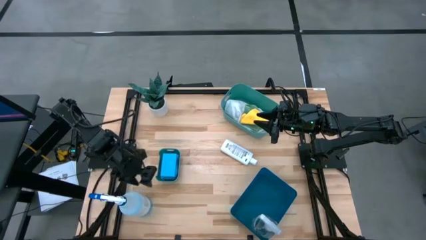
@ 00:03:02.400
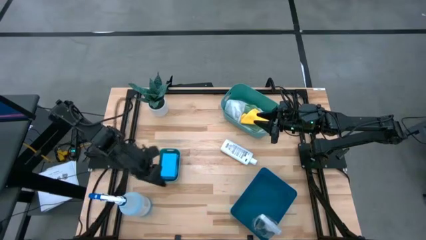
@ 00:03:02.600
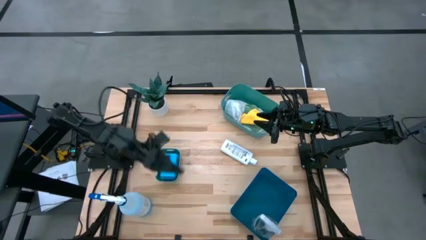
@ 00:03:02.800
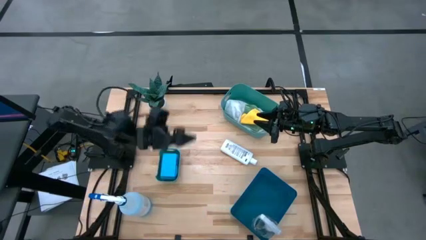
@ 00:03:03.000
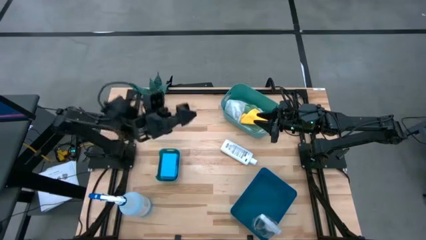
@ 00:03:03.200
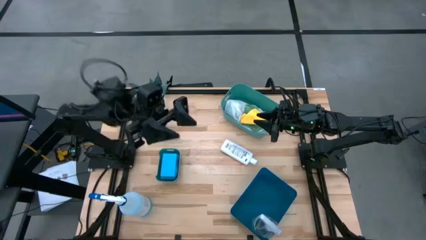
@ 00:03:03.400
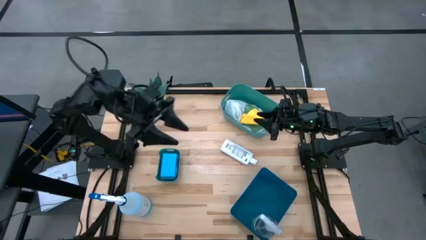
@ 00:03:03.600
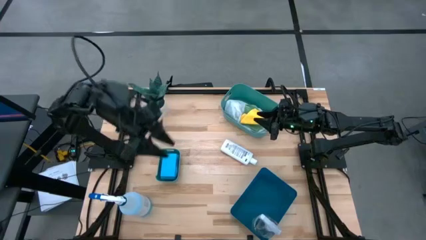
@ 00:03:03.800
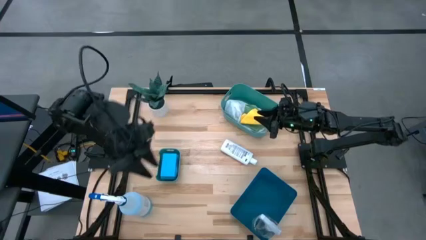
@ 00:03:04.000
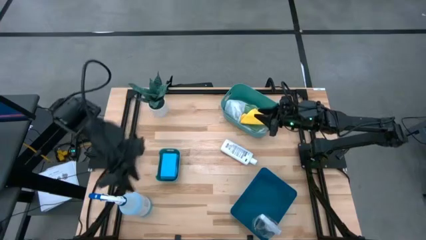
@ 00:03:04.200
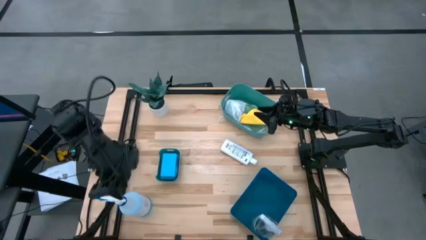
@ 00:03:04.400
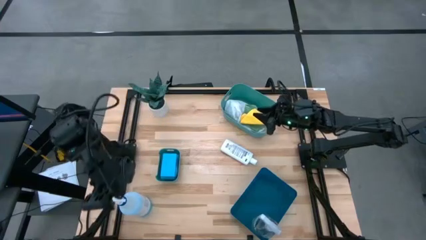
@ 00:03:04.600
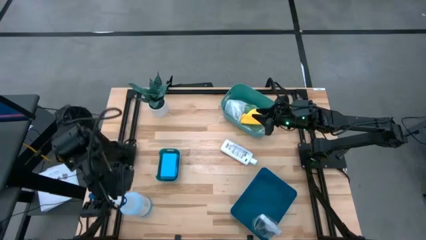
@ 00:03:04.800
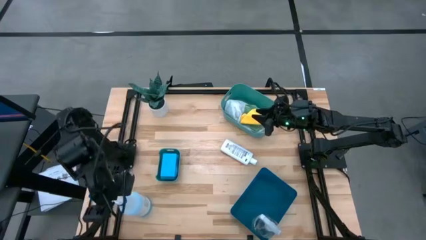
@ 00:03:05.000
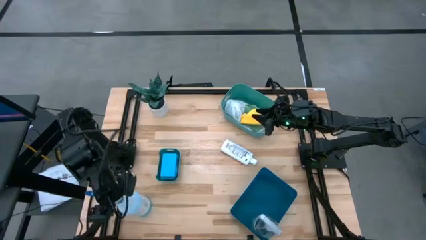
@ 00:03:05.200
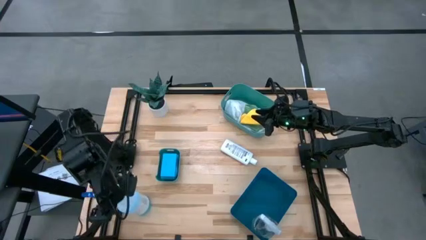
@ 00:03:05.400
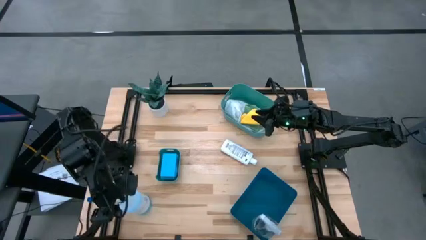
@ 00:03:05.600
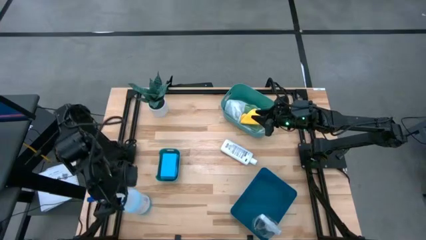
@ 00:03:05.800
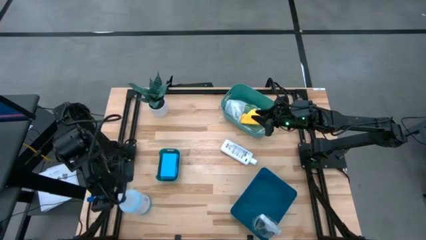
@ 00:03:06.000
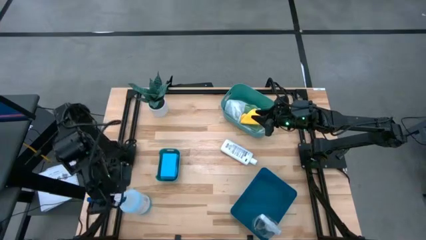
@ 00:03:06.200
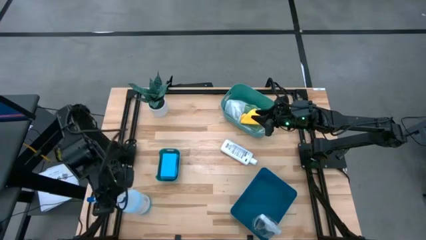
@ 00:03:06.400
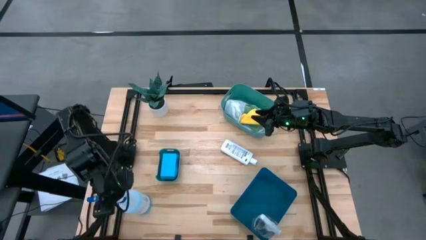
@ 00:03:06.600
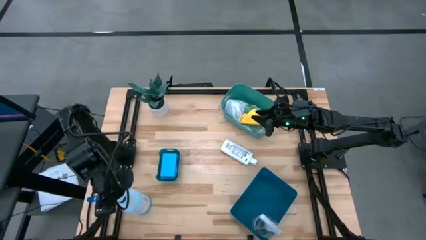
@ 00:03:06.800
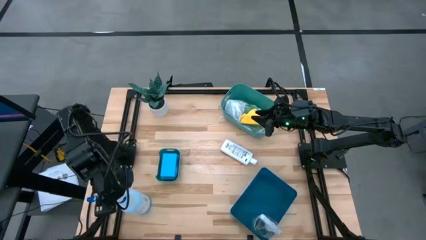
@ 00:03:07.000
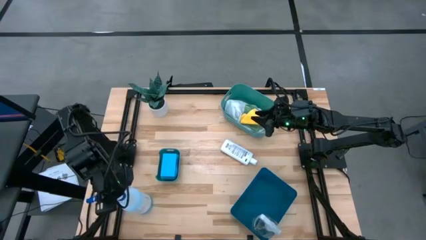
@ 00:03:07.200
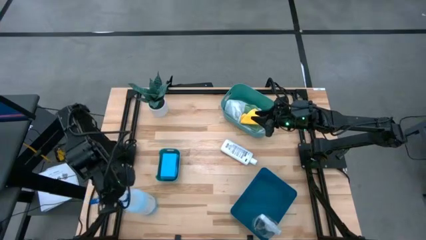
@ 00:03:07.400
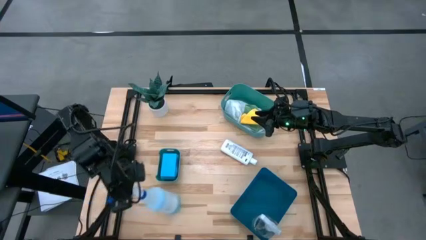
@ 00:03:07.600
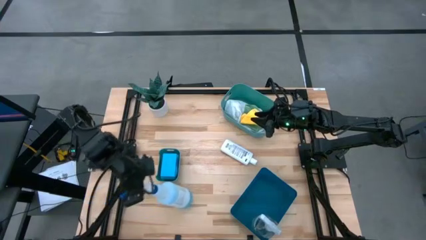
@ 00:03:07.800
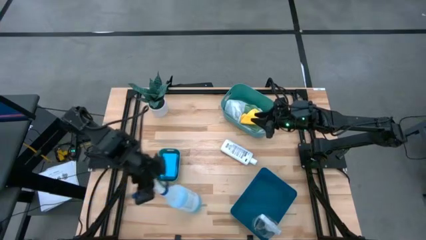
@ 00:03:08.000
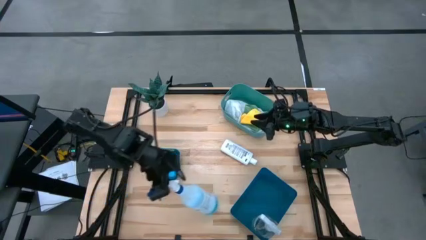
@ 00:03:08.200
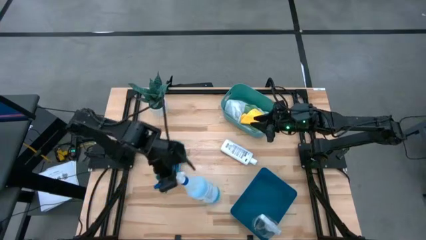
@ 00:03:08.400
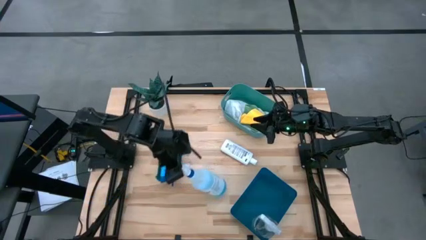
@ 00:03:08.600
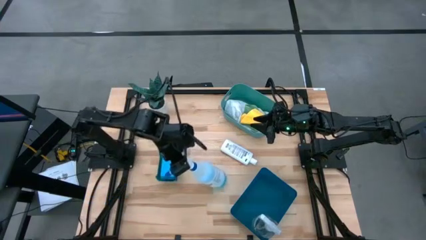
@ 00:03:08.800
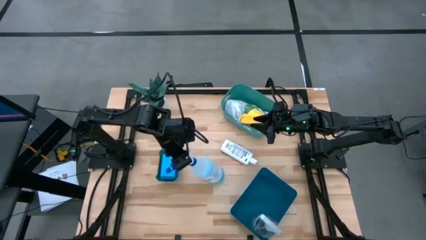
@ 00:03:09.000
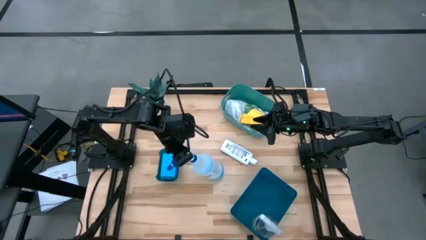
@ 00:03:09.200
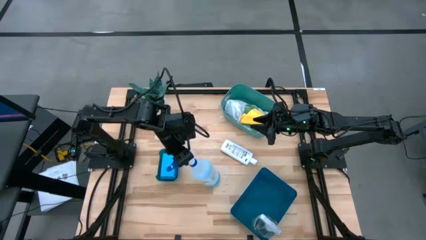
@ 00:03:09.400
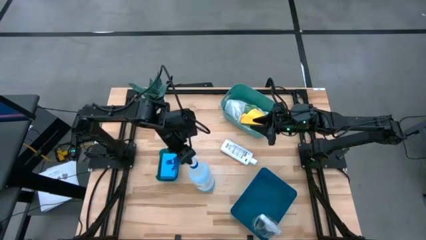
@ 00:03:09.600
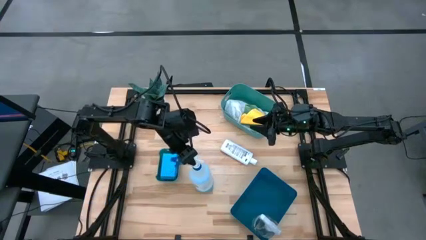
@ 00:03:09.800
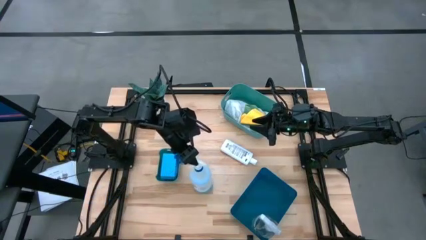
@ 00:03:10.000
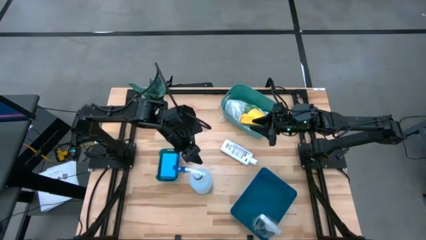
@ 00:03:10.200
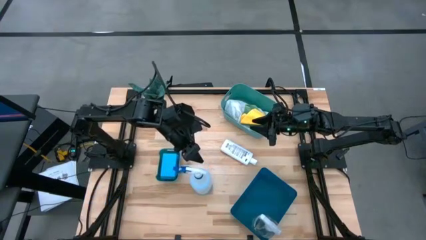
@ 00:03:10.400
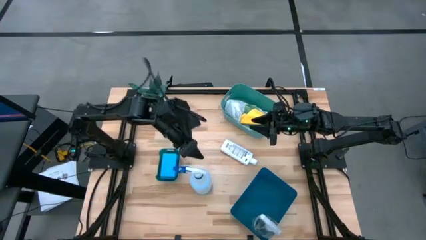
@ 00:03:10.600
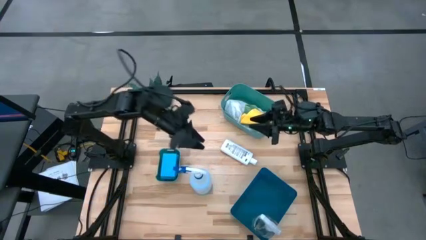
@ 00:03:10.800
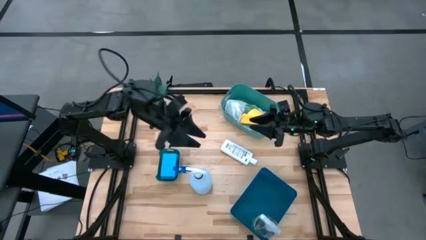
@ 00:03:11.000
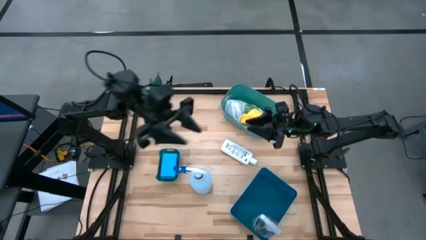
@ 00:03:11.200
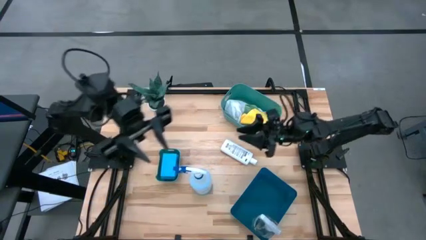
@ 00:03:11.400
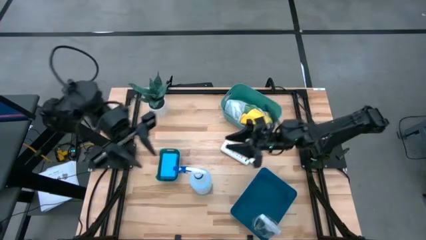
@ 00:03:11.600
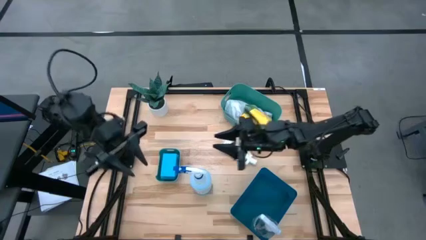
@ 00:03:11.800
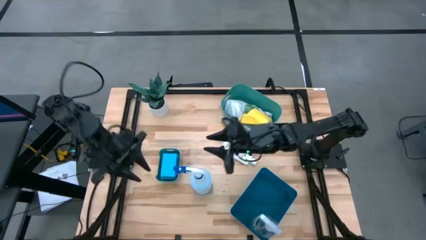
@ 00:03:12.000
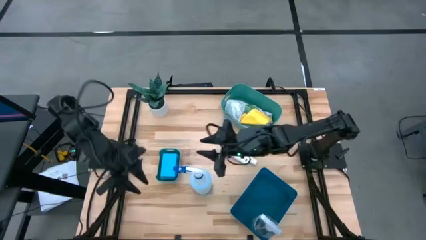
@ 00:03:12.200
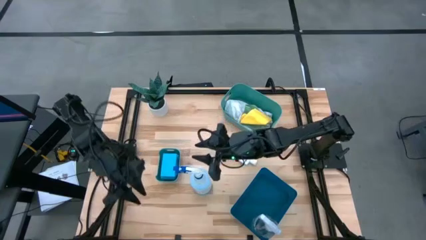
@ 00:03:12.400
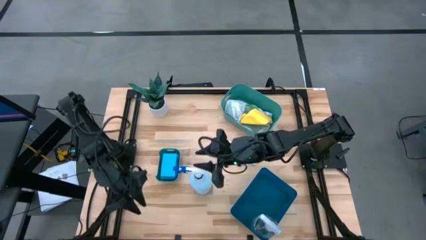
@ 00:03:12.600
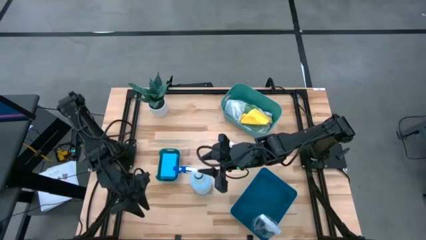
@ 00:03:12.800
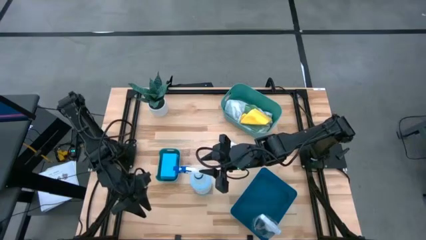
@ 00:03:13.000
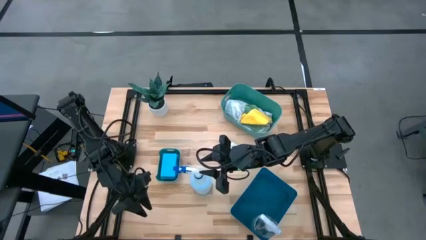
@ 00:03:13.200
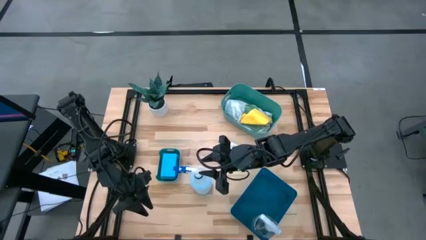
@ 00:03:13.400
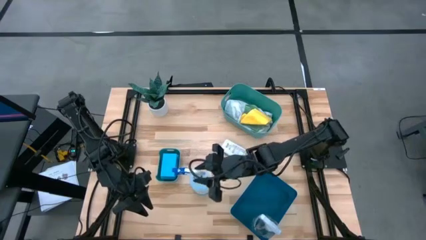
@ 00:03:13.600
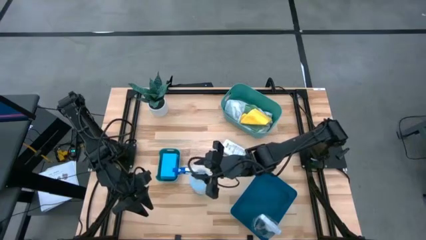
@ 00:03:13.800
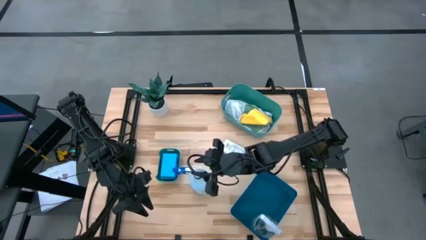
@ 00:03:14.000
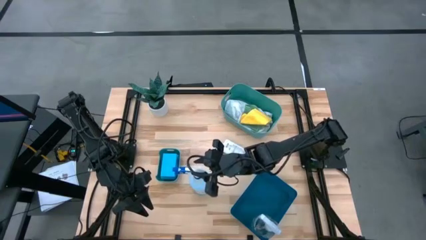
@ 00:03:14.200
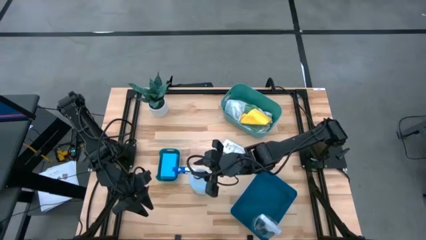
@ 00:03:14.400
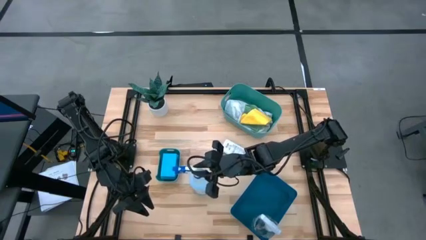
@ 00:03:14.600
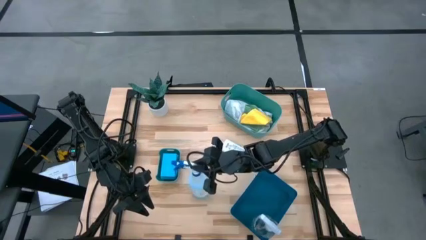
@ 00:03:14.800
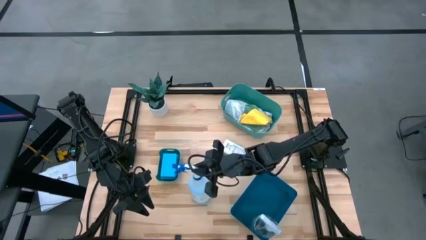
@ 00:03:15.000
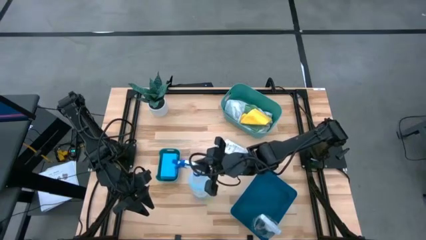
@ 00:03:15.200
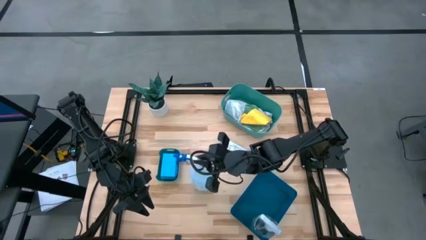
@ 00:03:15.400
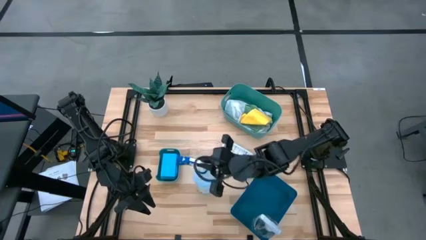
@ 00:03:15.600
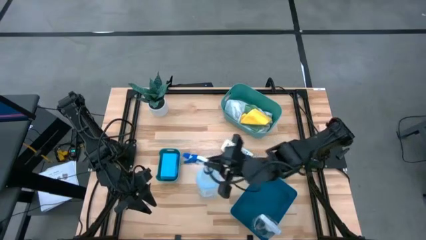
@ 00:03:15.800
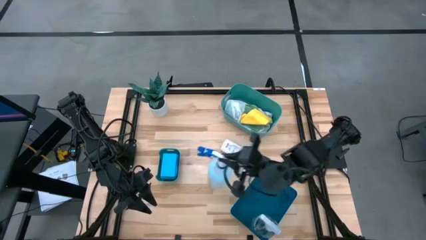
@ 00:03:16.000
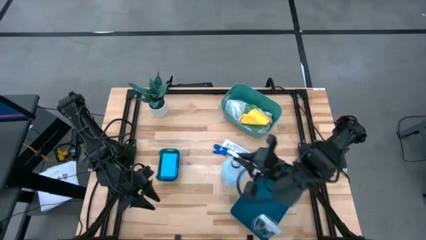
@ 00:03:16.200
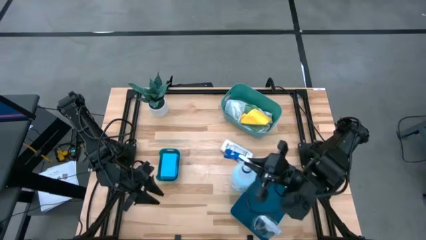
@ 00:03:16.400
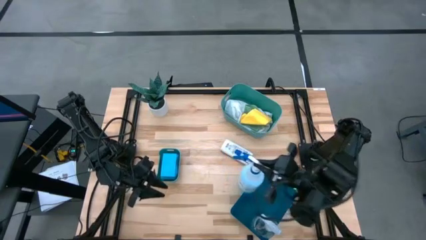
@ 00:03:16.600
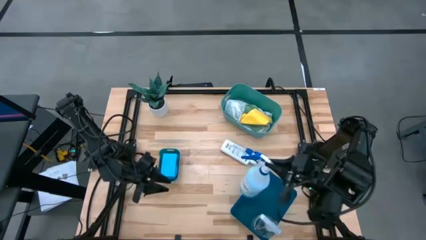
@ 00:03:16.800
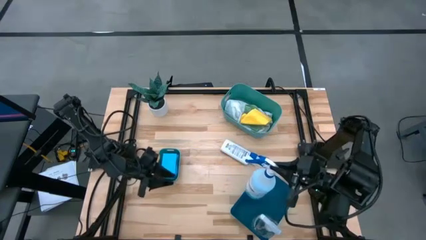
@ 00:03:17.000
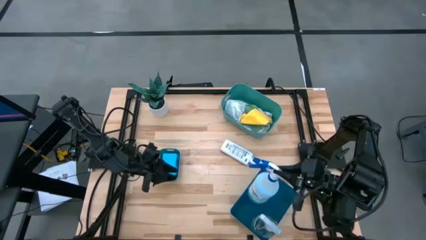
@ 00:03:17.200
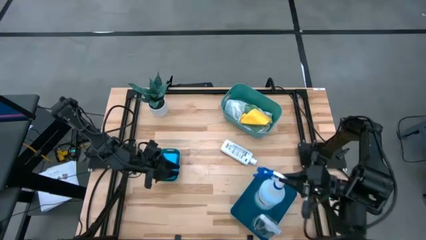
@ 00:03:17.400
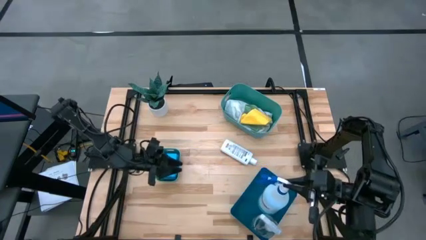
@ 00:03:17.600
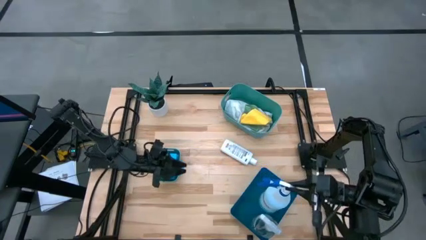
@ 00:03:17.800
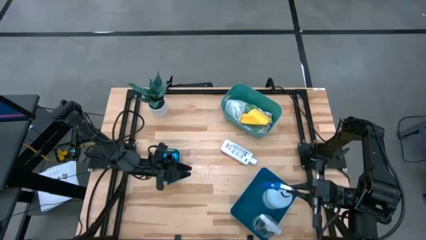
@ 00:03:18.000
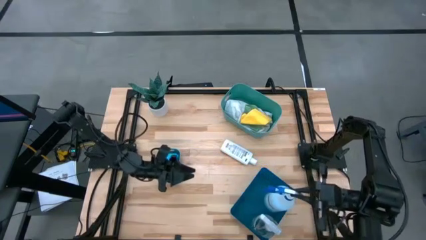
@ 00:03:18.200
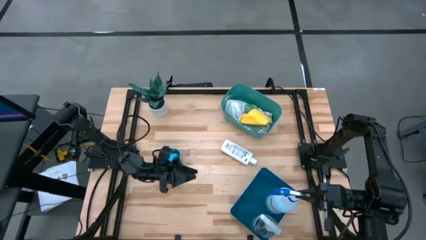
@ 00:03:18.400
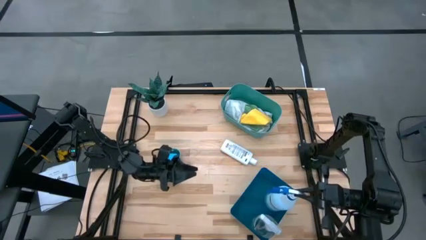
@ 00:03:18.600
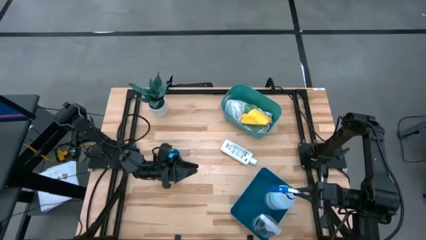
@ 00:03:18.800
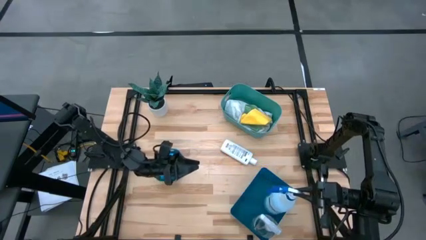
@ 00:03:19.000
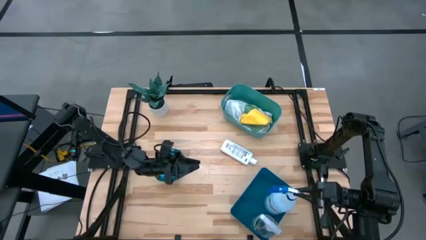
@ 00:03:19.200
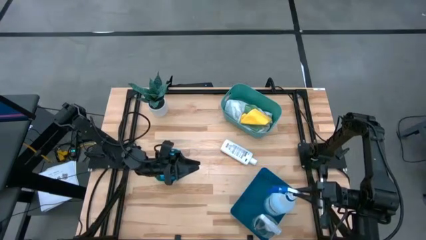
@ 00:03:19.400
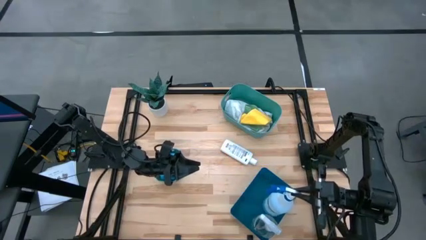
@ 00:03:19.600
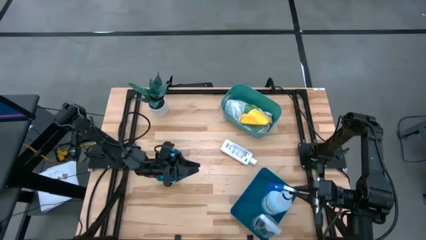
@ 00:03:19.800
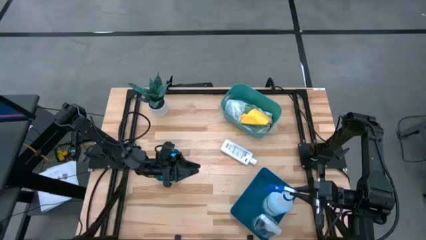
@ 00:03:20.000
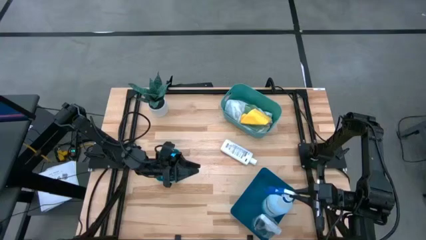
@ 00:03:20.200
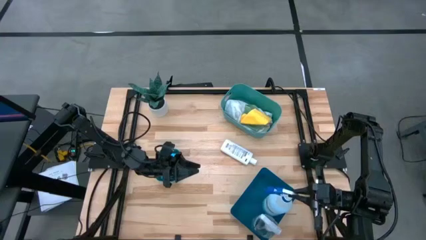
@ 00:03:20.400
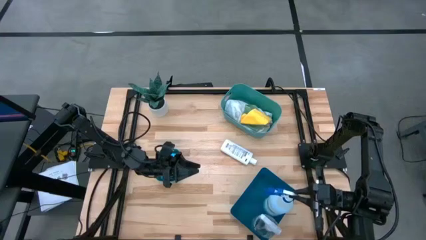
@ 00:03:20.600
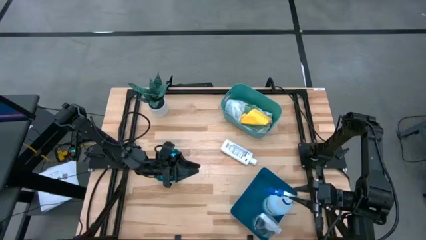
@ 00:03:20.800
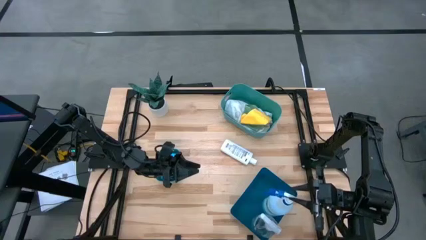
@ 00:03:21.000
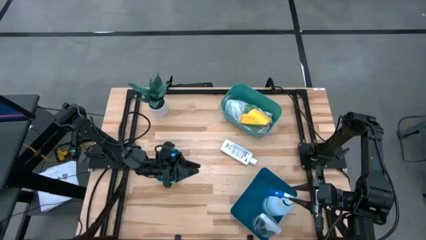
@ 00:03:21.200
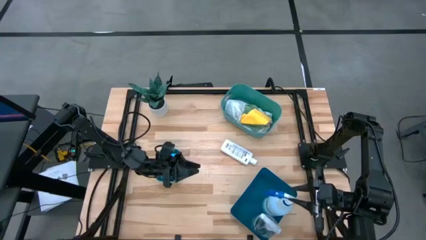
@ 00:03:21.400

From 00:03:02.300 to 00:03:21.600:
Task: Pick & Place Kitchen Items
Put the blue spray bottle into the blue bin
